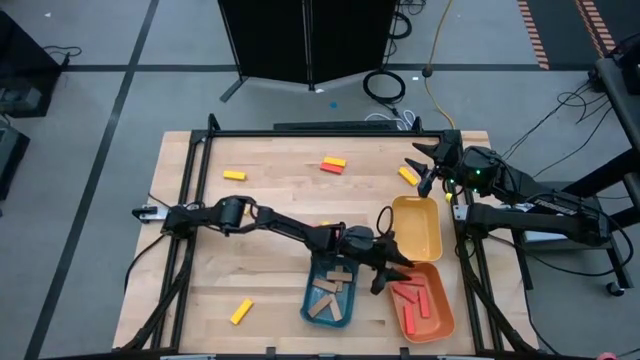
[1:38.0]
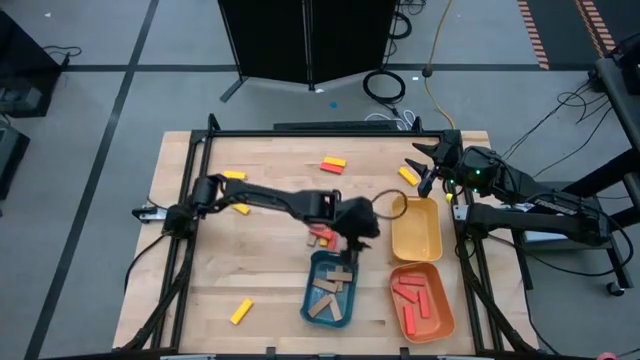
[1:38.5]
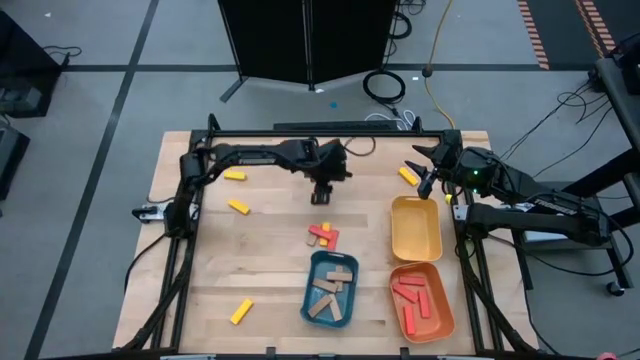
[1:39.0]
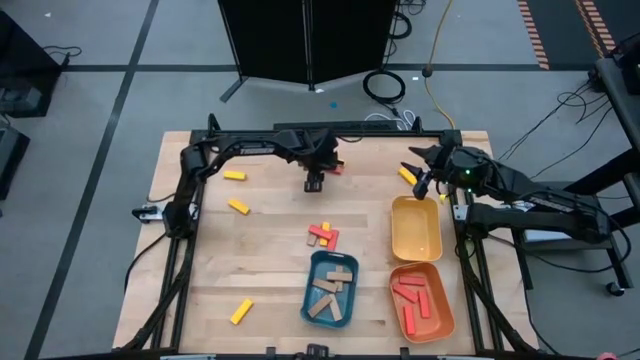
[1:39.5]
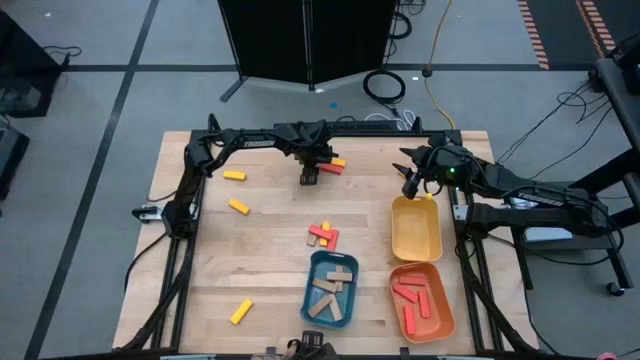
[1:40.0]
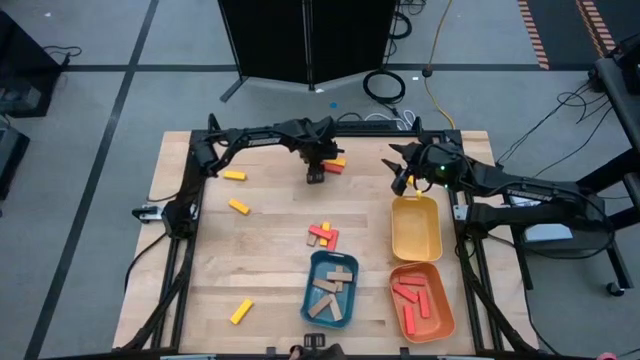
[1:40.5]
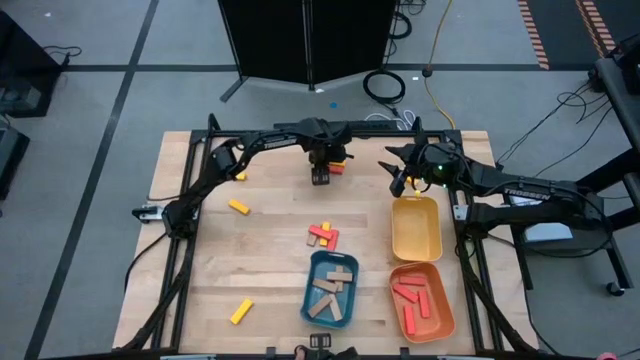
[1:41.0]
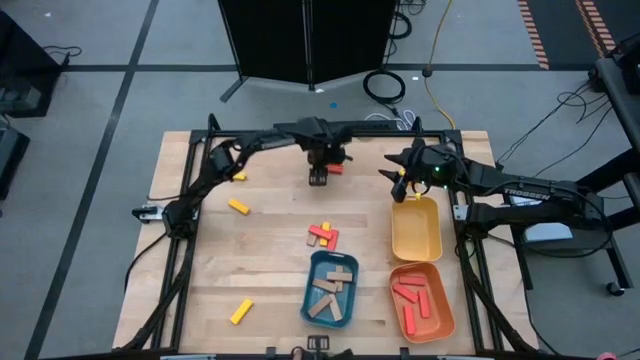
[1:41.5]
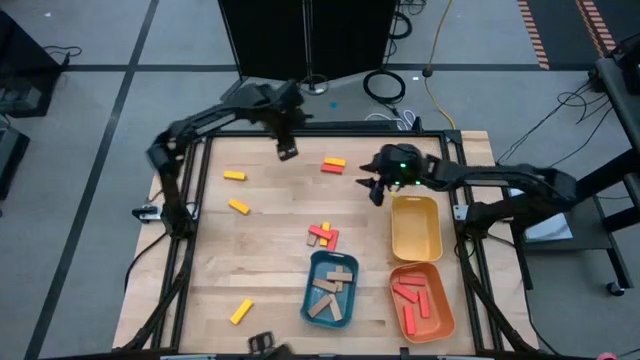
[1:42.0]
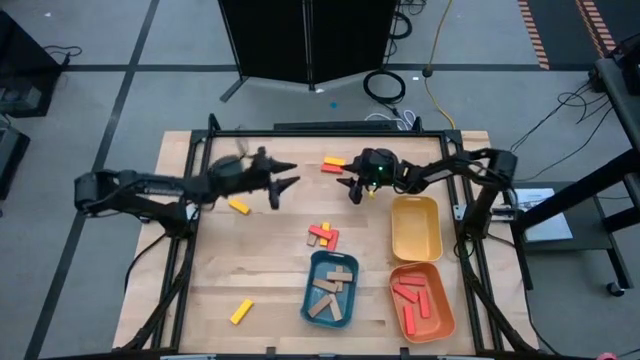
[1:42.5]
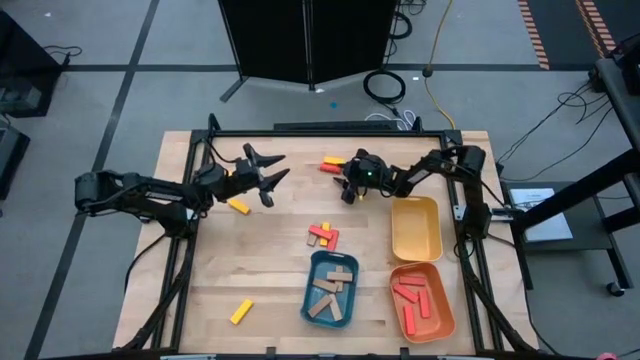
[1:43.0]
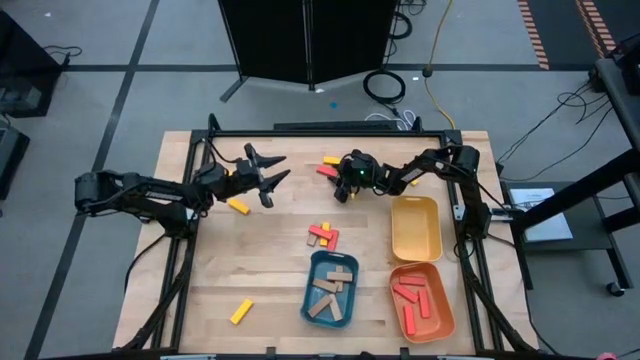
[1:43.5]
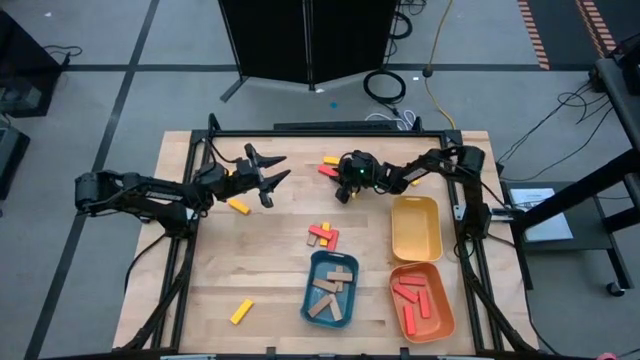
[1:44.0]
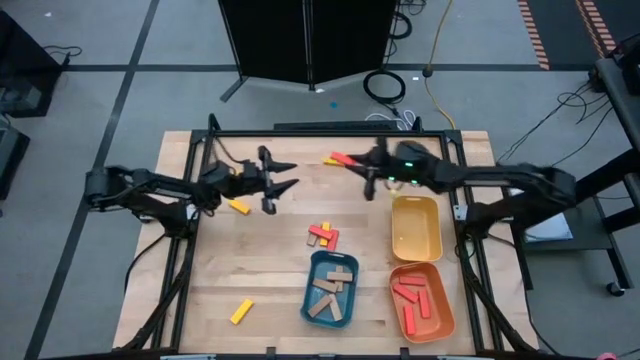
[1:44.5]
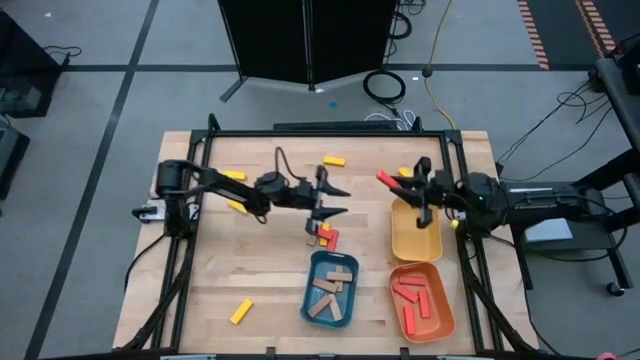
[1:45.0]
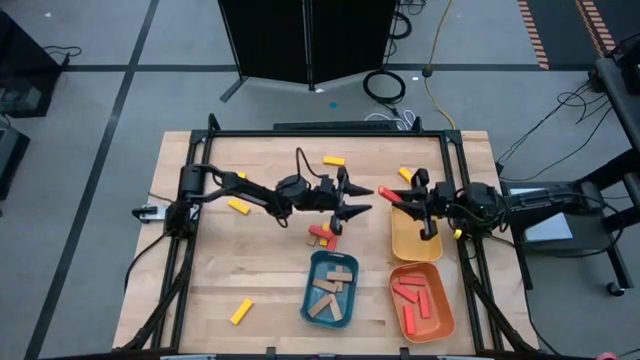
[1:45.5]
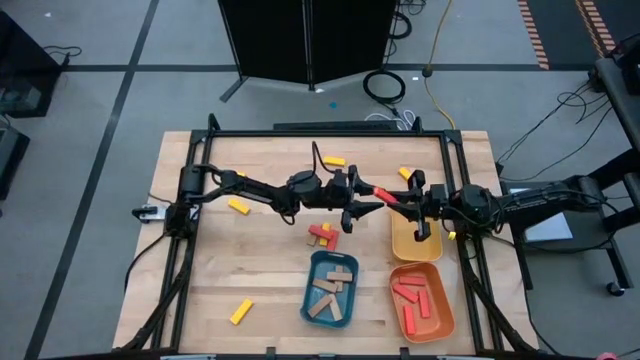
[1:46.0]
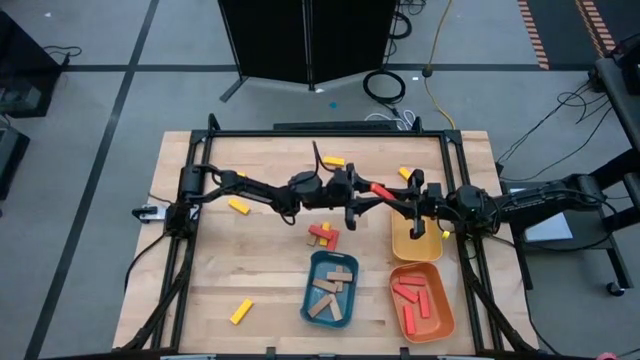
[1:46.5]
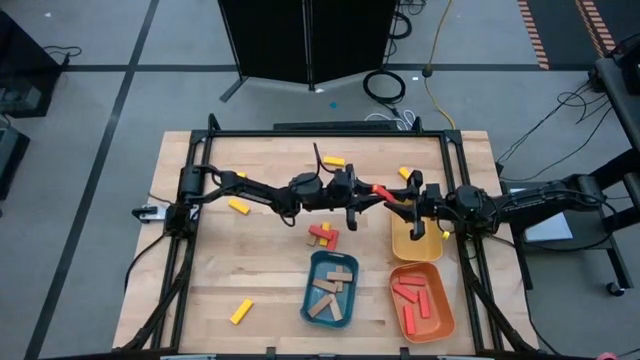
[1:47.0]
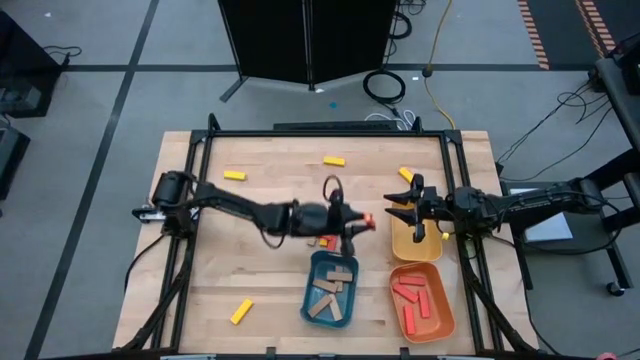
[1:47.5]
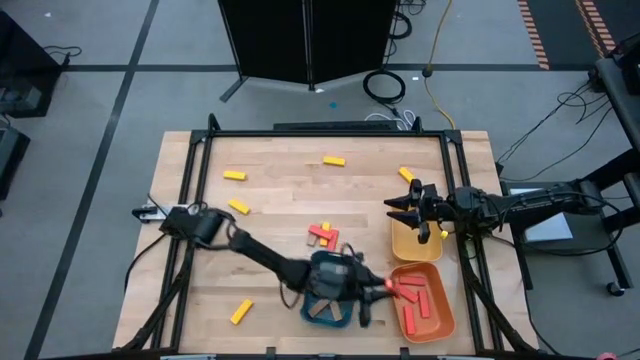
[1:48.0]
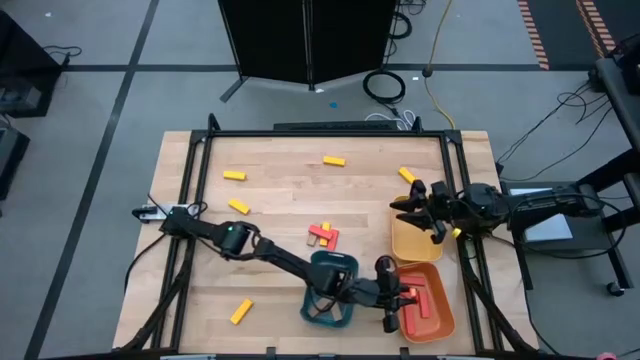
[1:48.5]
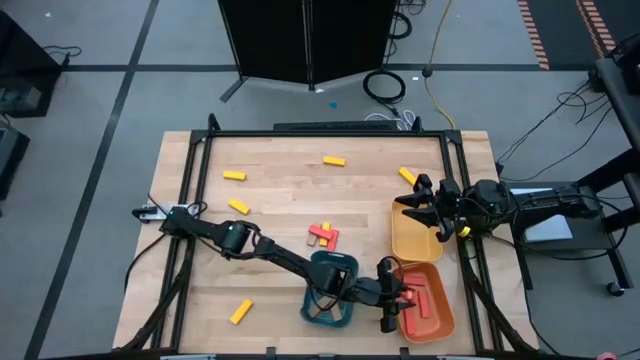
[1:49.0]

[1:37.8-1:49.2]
Task: Sort blocks
Put the orange block into the orange bin

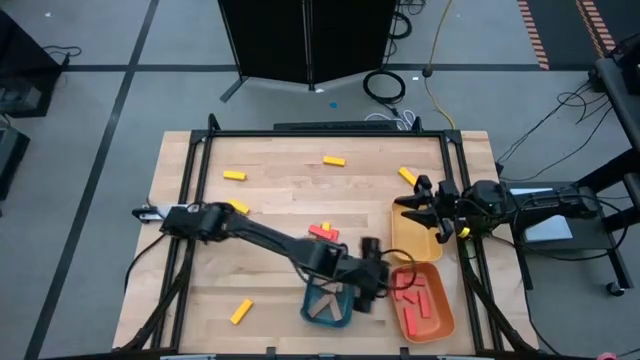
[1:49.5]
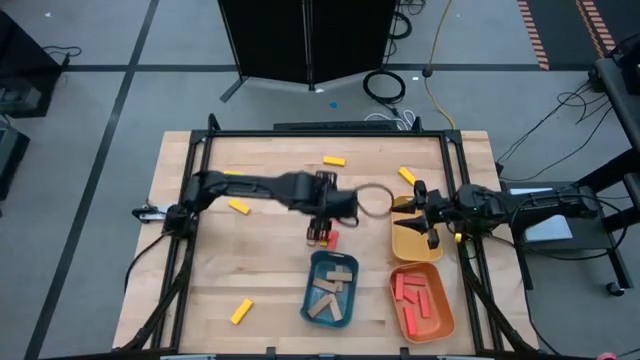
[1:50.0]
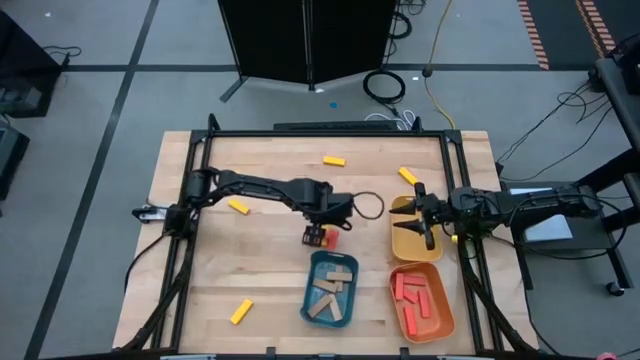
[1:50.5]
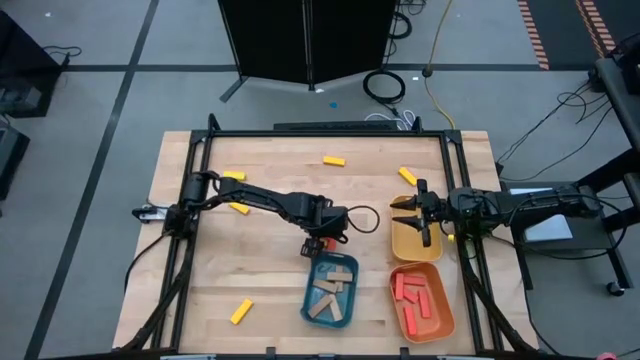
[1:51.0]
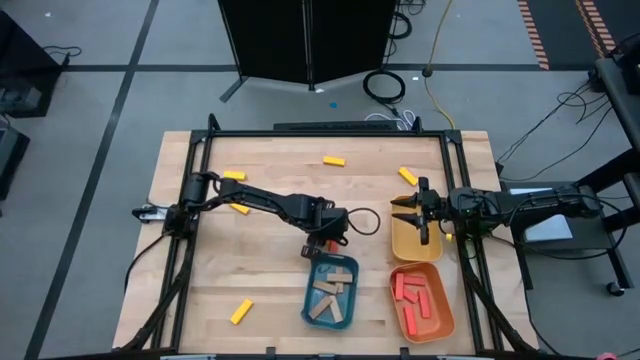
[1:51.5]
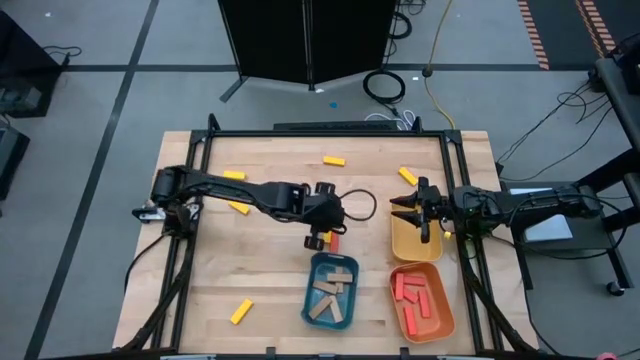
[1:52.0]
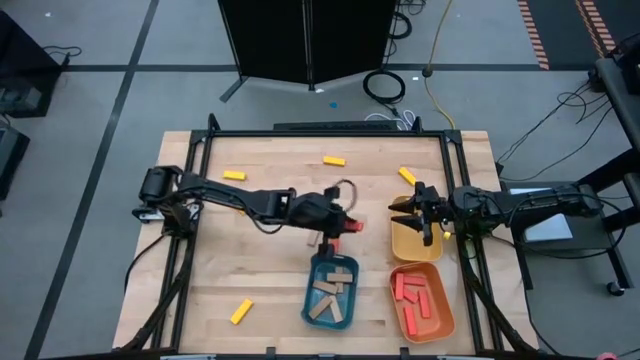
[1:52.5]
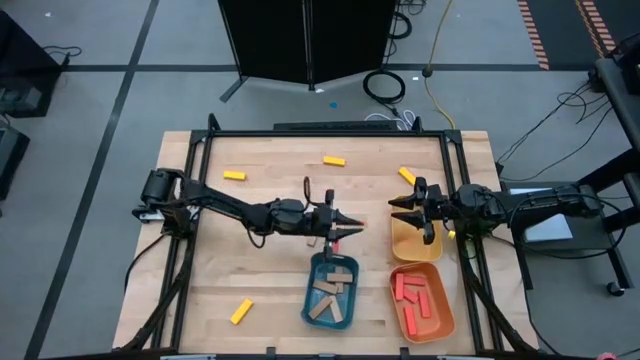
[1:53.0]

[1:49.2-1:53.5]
Put the orange block into the orange bin

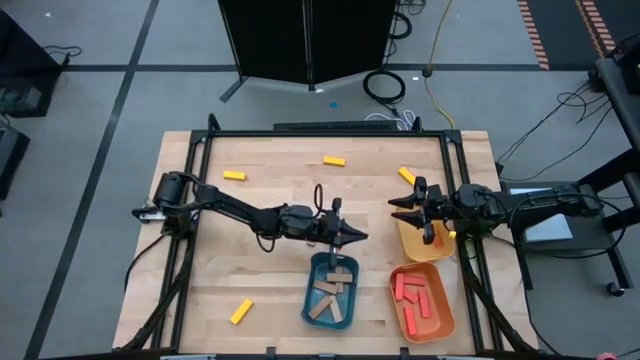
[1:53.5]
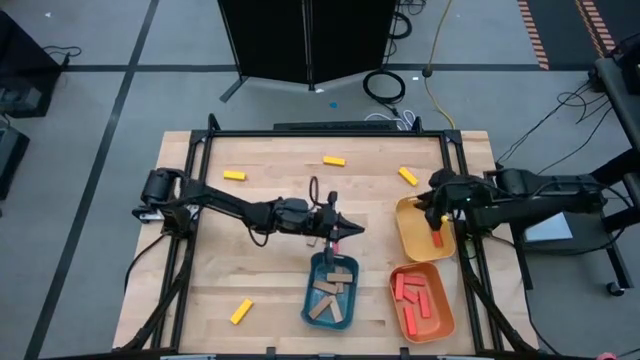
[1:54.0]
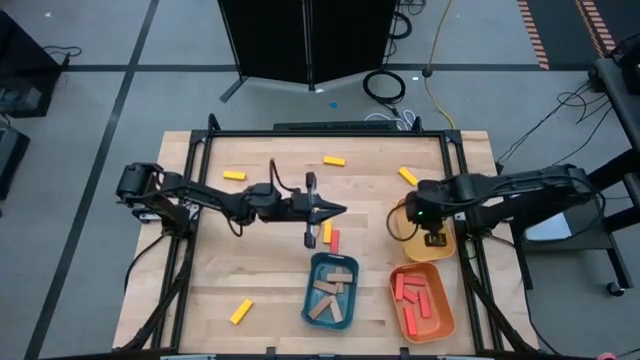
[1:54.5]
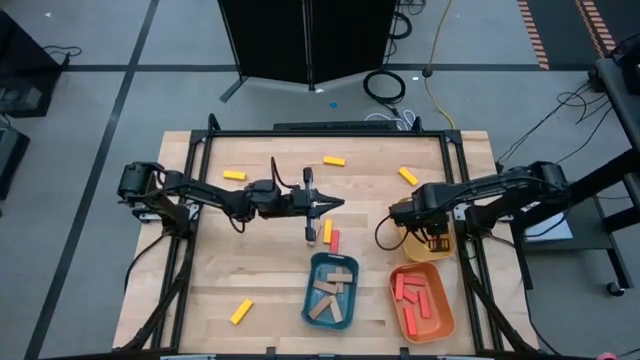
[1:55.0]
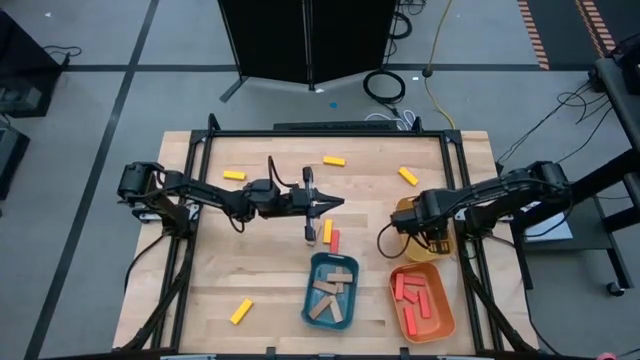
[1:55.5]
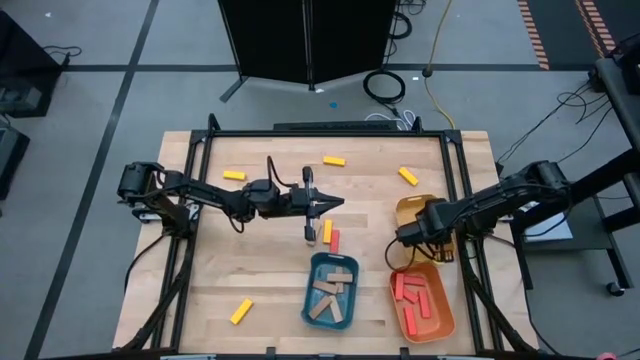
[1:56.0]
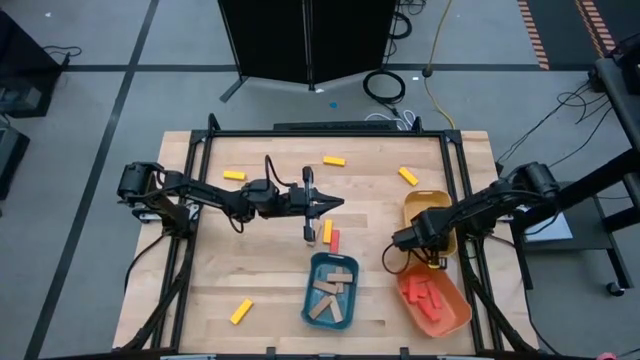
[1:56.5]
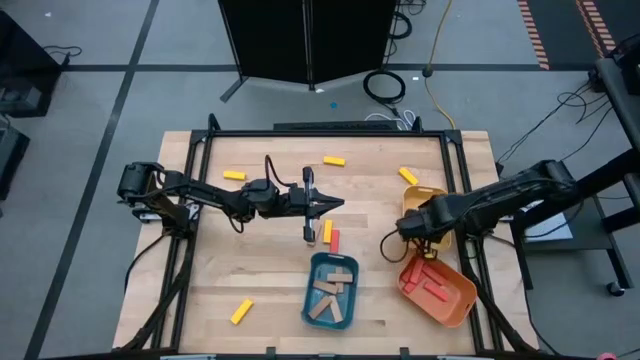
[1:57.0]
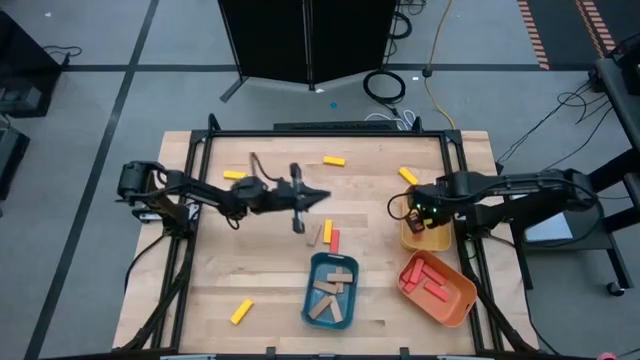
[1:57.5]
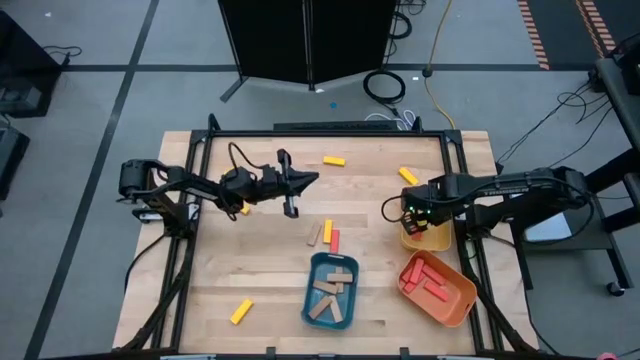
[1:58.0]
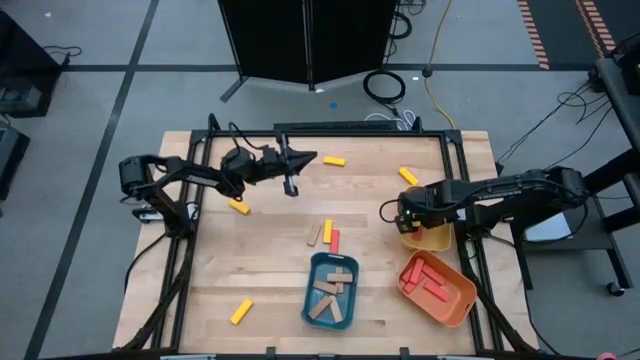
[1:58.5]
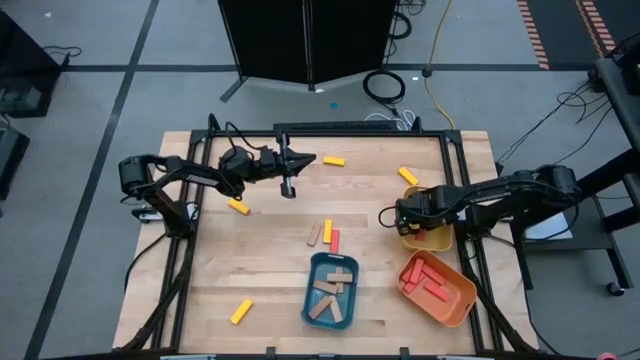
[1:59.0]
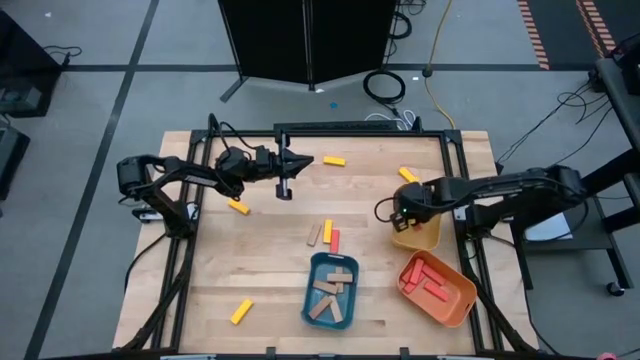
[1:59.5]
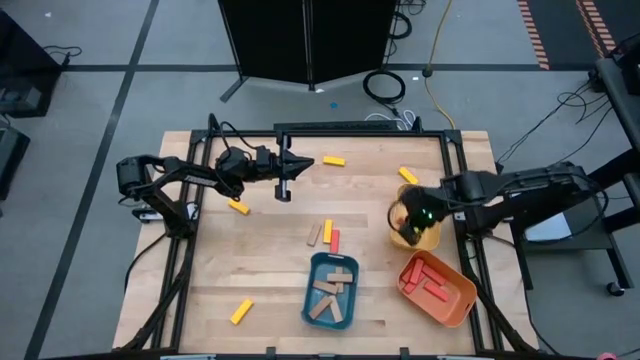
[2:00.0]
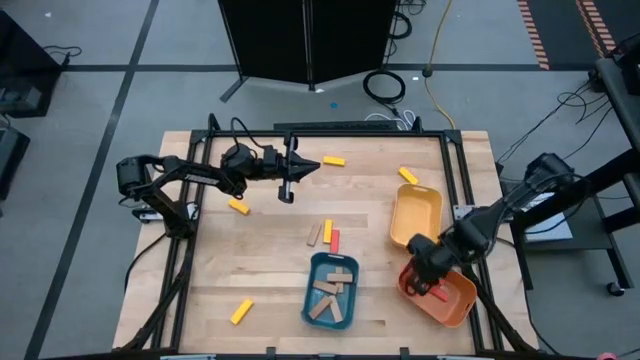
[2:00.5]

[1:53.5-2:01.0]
Put the orange block into the orange bin
